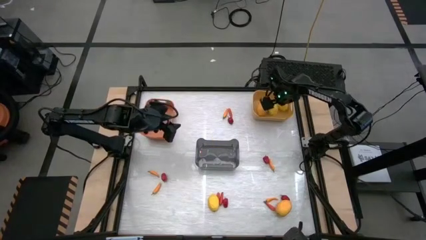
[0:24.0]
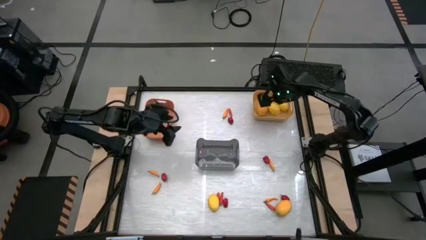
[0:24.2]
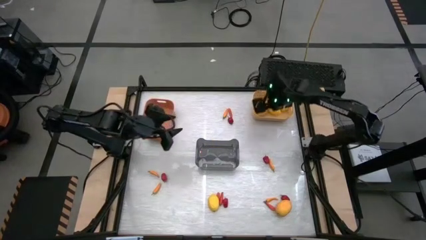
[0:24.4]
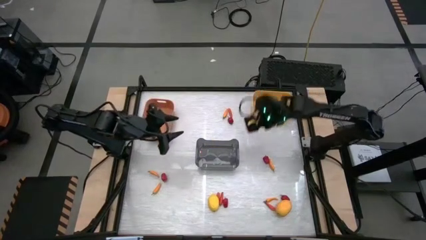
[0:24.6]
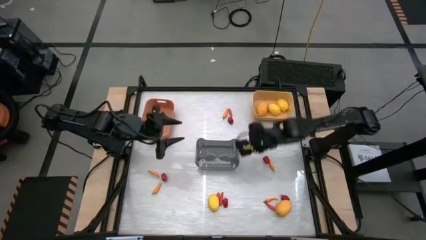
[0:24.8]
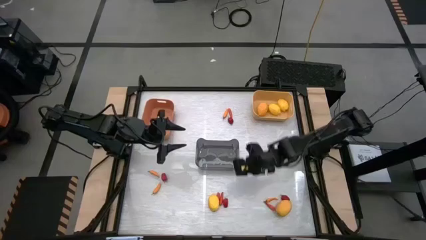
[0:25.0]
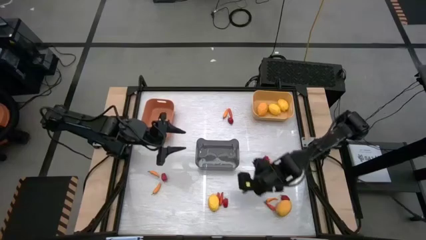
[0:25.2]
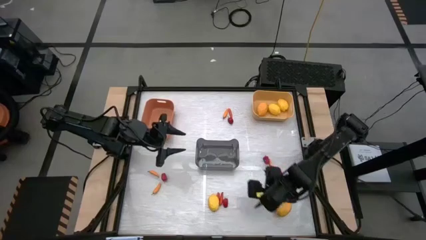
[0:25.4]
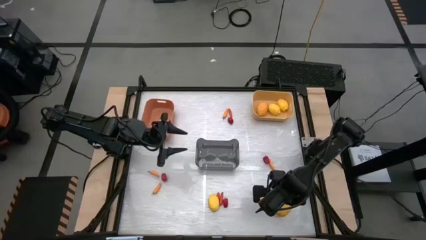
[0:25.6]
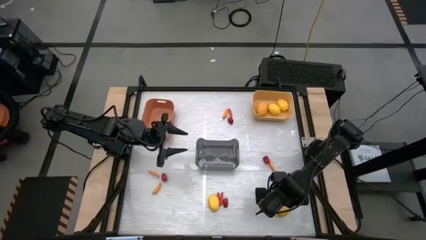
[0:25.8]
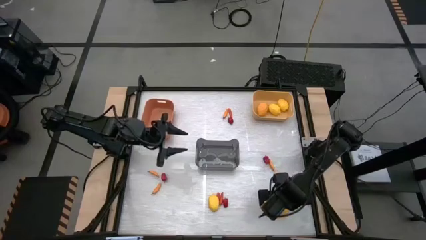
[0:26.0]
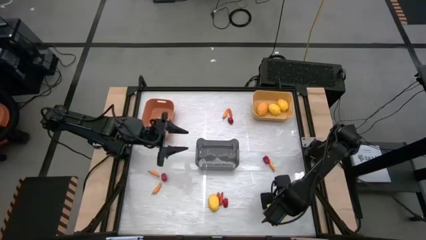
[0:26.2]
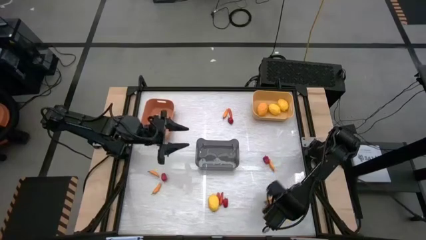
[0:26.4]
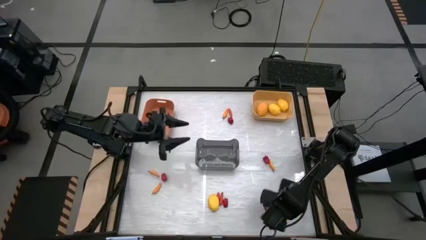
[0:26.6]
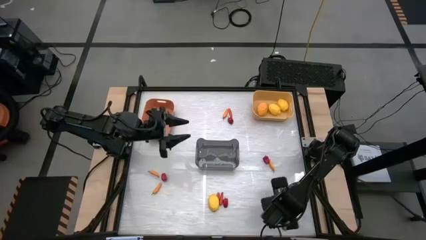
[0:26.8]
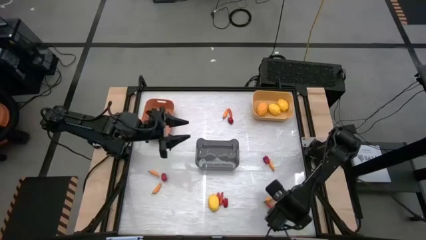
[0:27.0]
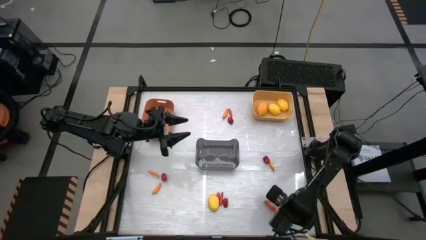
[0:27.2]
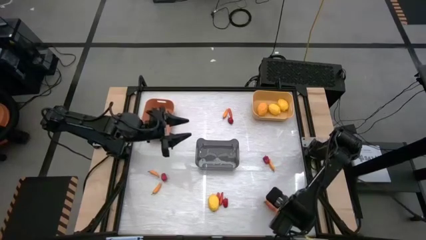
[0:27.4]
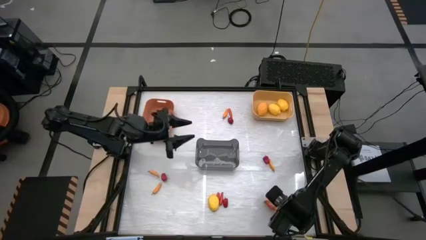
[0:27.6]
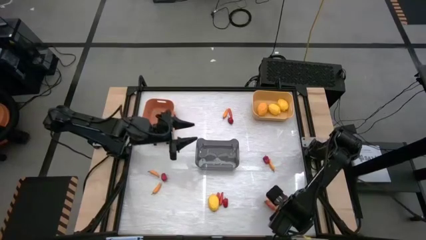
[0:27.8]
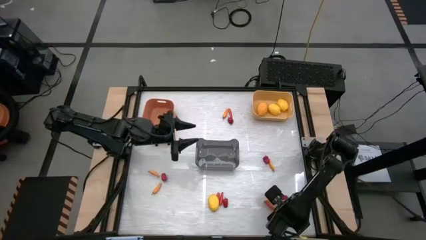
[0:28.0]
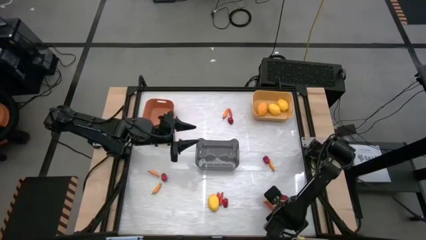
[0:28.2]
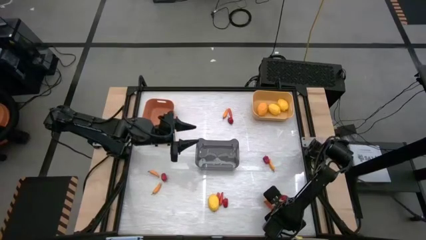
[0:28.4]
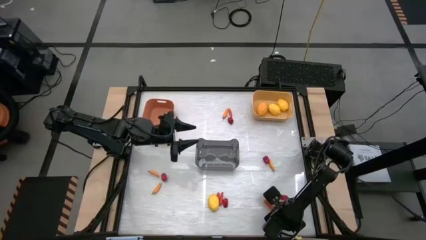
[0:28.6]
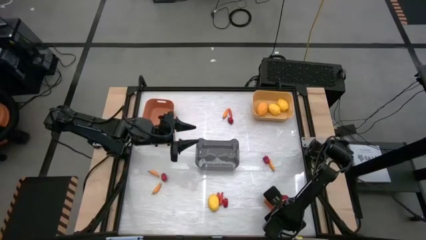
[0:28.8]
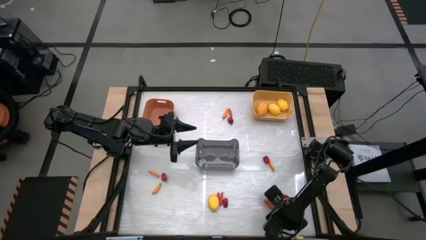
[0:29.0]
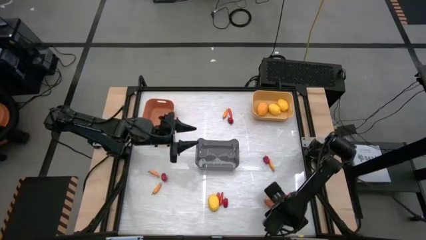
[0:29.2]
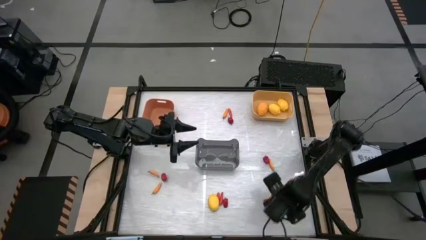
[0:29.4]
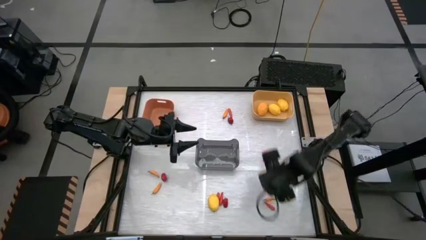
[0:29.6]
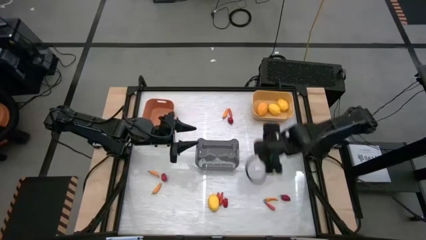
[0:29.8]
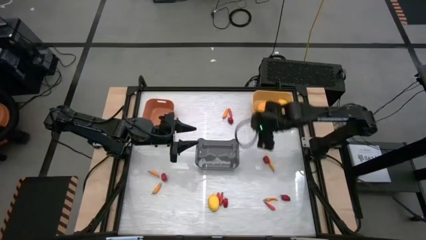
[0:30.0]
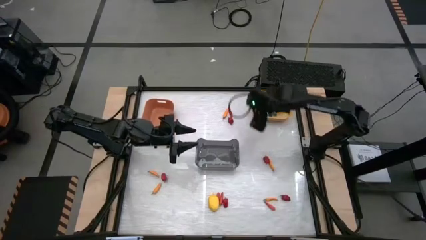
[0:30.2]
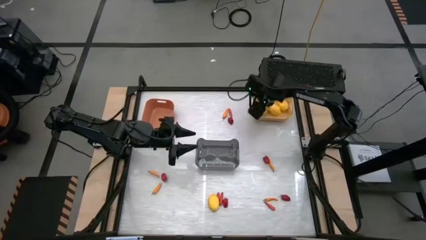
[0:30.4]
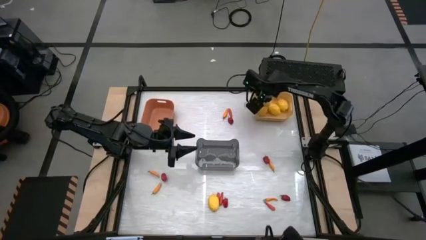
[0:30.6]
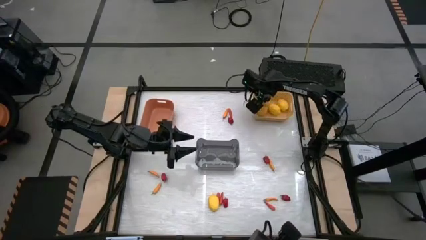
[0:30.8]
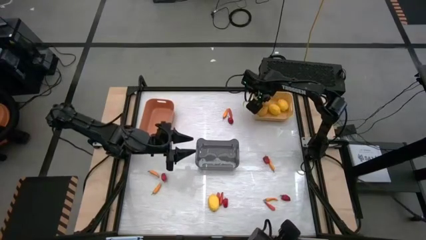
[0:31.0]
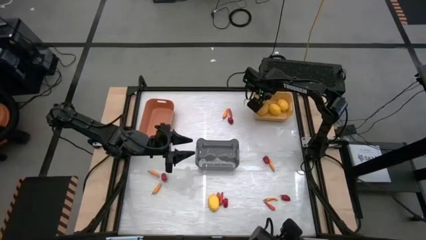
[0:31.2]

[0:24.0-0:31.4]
Task: Sort produce into baskets
Put the yellow lemon into the yellow bin

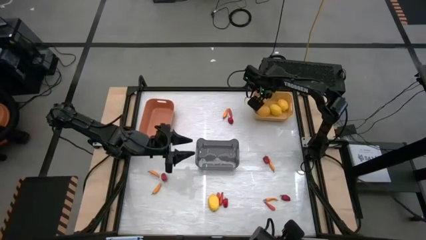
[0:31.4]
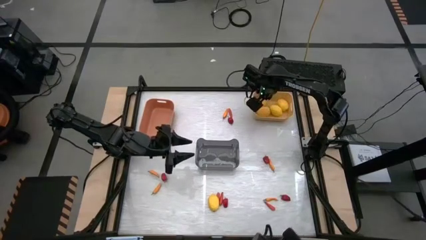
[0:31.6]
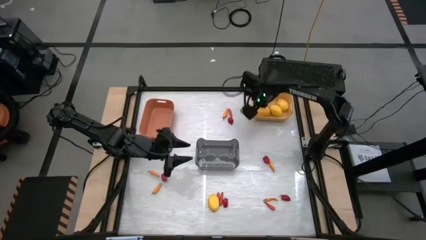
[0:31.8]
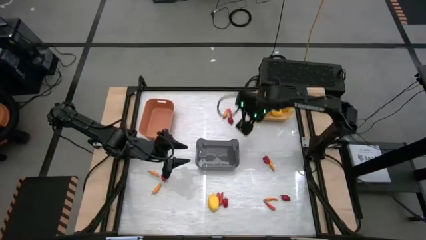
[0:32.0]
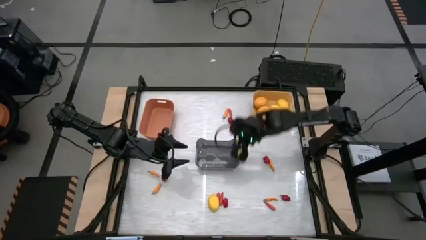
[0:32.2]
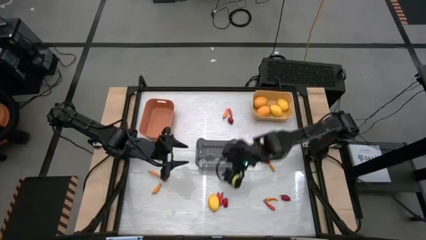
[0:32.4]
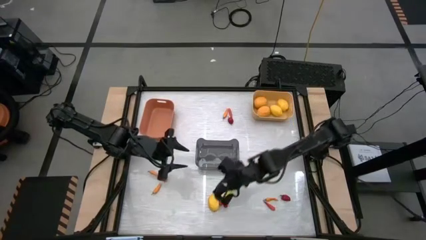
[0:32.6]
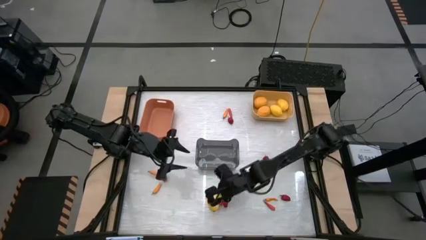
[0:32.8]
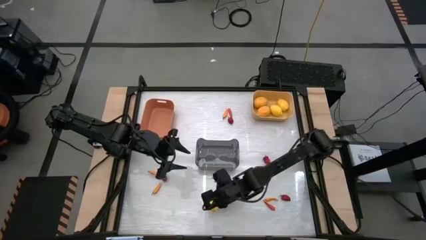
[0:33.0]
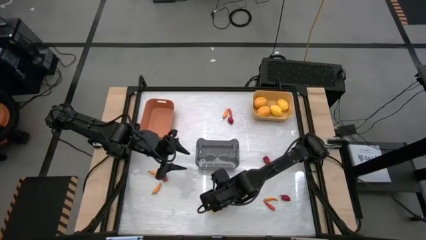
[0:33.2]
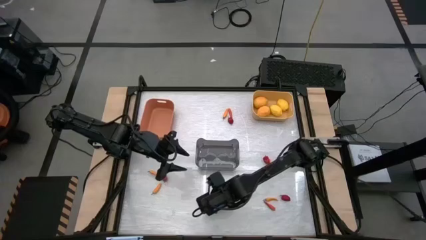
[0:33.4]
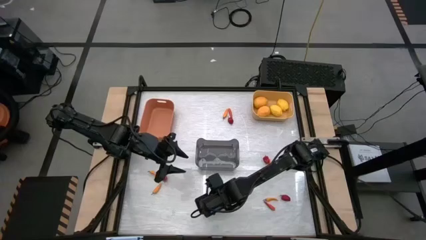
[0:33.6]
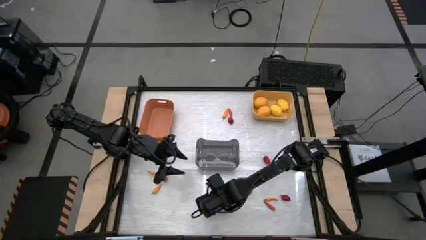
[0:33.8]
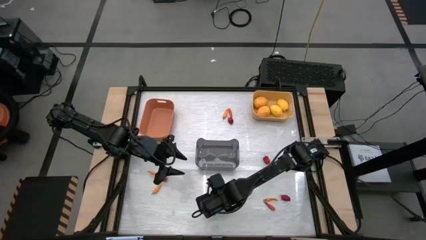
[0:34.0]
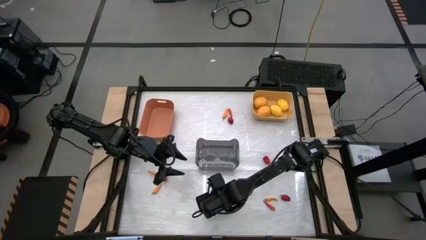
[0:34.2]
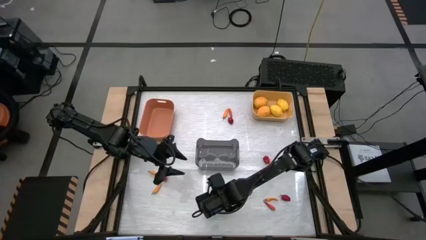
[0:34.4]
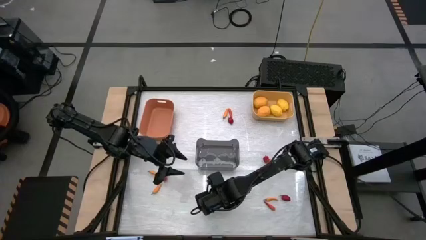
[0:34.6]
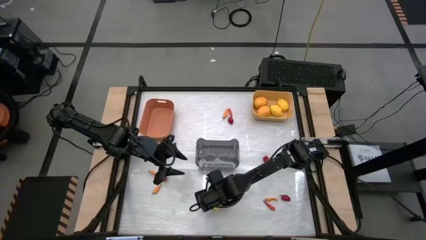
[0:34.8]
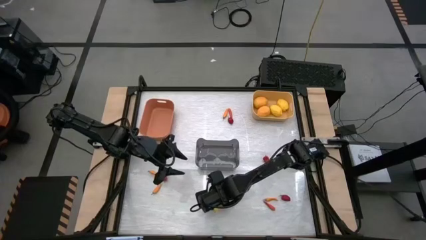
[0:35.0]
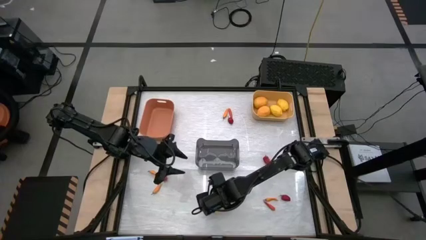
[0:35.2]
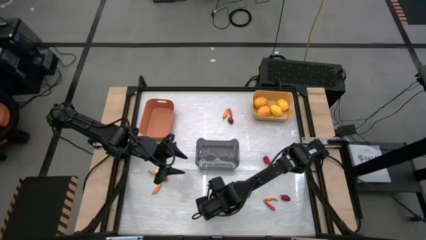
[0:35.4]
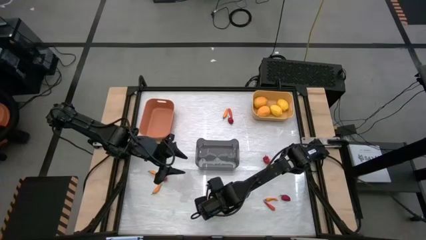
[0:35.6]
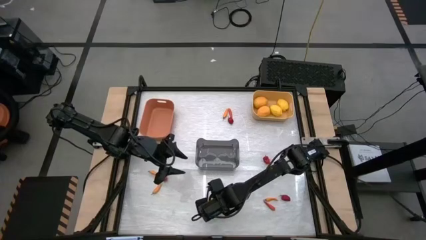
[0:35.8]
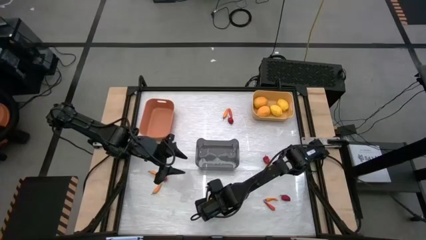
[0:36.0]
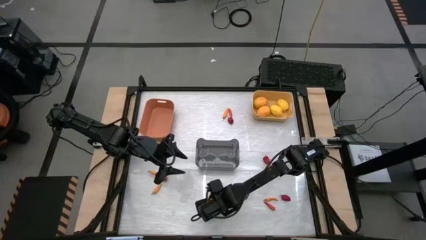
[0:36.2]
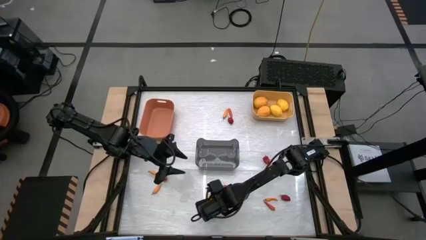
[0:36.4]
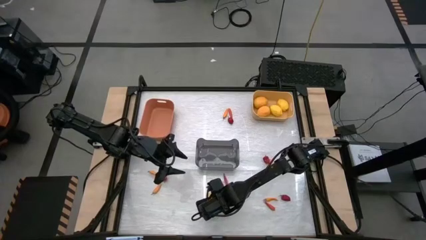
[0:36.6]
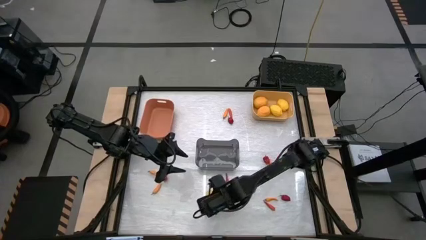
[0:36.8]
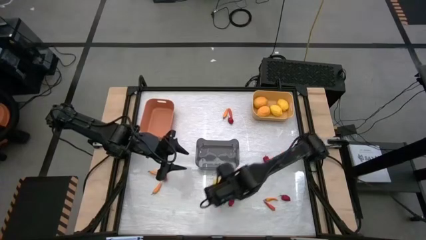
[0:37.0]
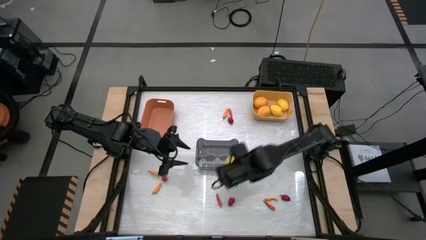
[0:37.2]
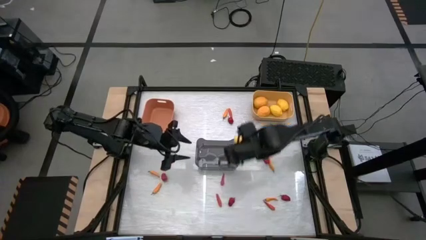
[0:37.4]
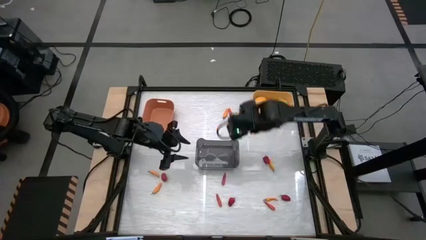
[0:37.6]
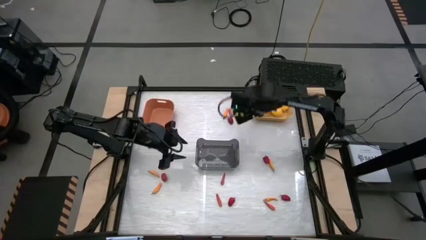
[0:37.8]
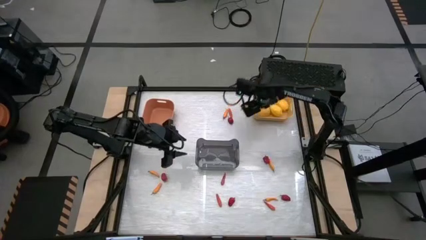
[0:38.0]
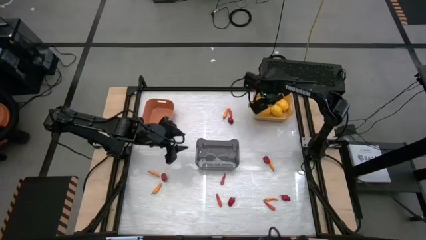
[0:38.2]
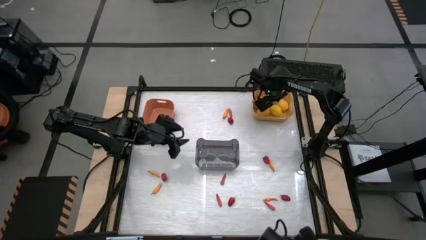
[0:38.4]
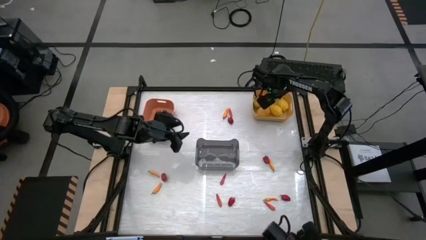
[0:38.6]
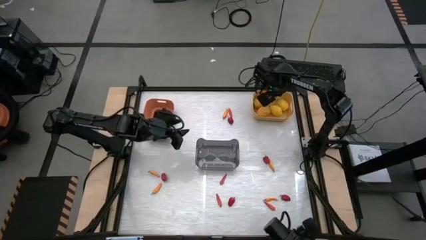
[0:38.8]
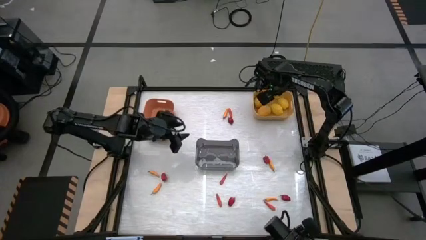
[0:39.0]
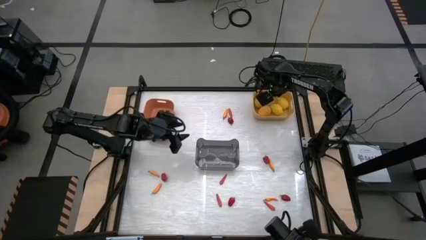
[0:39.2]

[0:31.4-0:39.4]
Put the yellow lemon into the yellow bin

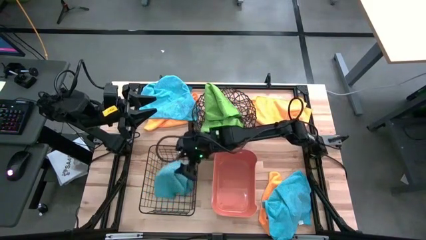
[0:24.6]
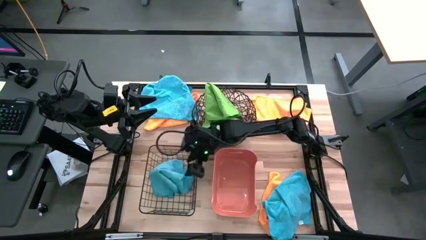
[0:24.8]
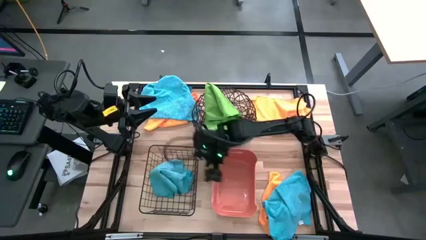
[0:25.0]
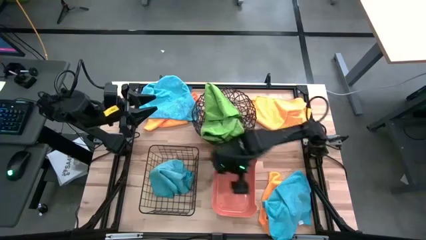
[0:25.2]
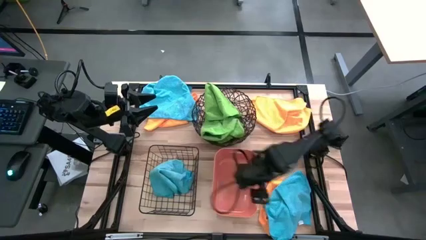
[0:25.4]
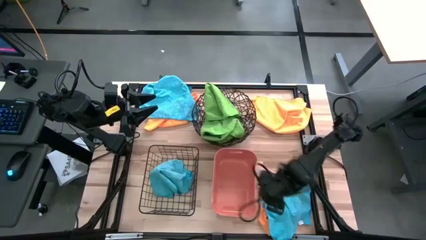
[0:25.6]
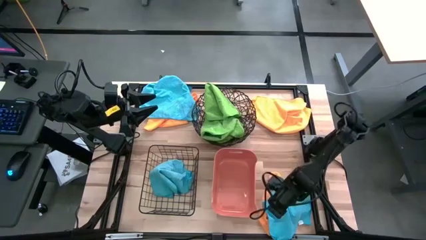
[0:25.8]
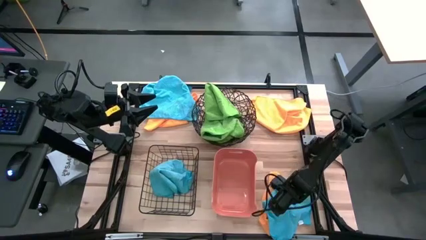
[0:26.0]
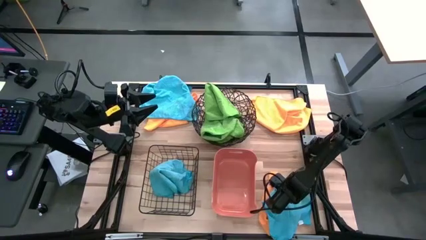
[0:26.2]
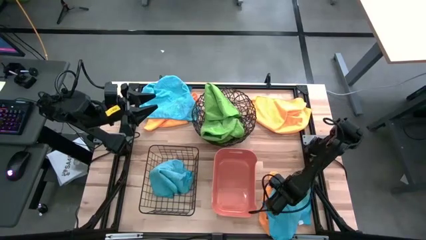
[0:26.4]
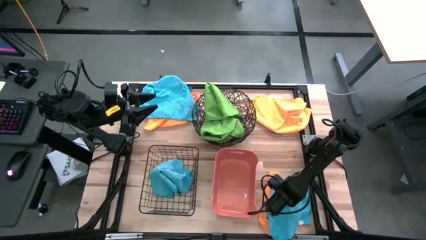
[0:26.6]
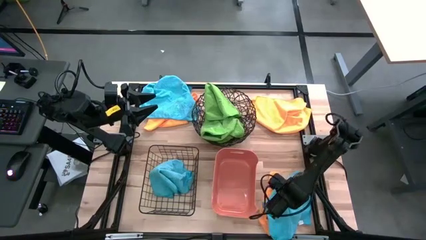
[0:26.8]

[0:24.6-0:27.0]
Task: Sort microfiber towel by color & place in baskets
Put the bottom blue microfiber towel into the black wire basket
